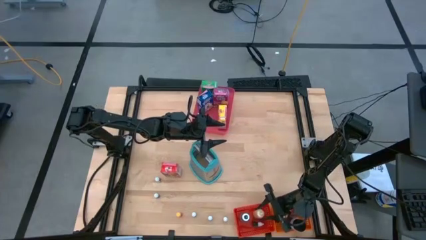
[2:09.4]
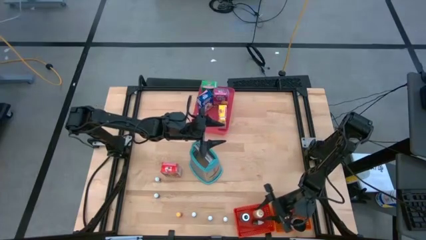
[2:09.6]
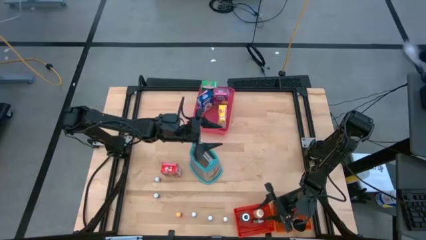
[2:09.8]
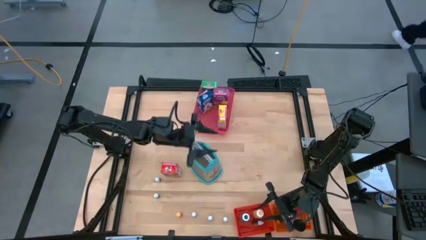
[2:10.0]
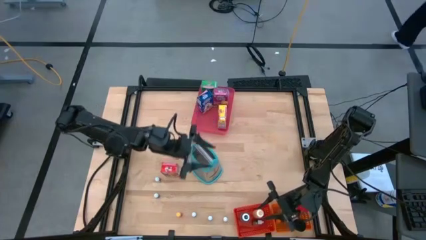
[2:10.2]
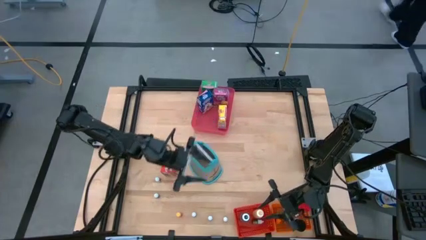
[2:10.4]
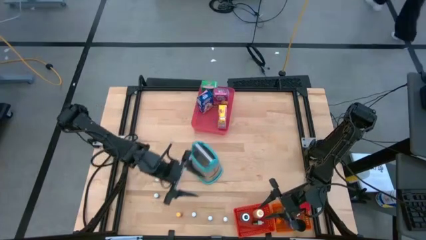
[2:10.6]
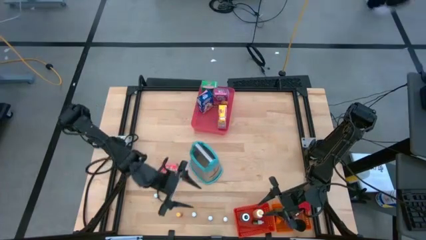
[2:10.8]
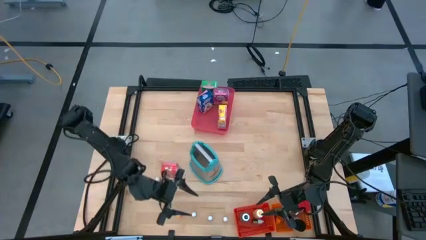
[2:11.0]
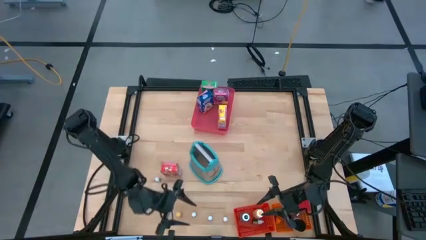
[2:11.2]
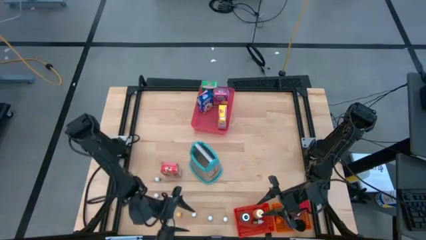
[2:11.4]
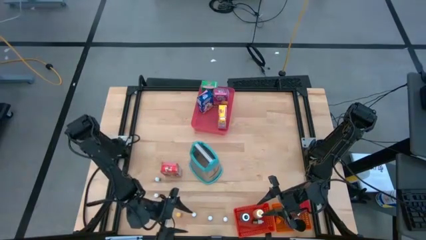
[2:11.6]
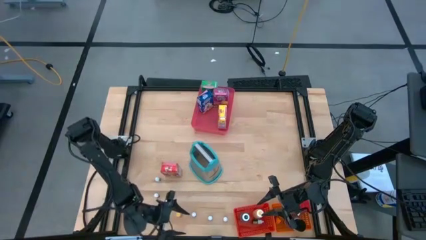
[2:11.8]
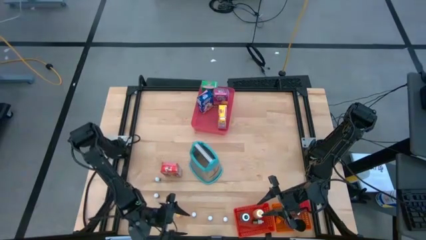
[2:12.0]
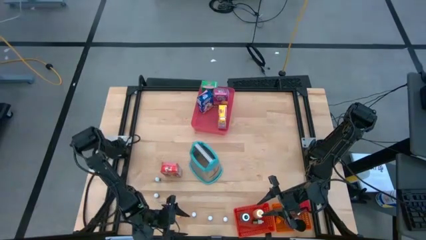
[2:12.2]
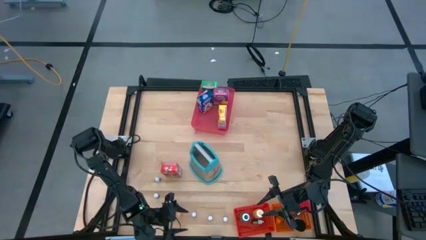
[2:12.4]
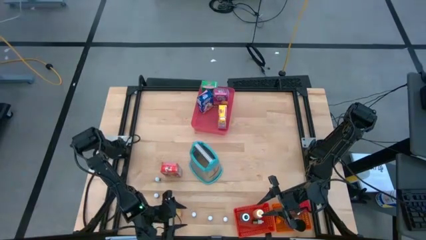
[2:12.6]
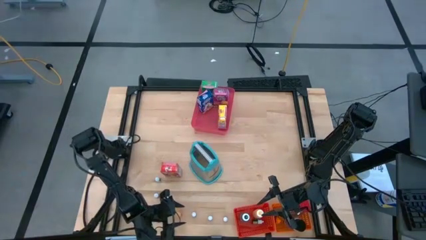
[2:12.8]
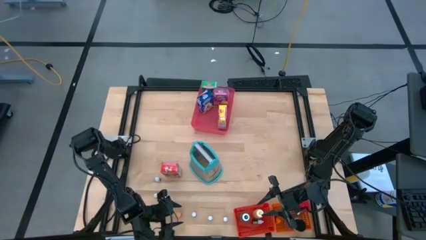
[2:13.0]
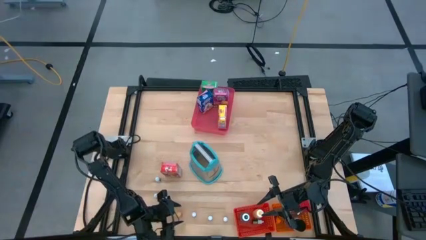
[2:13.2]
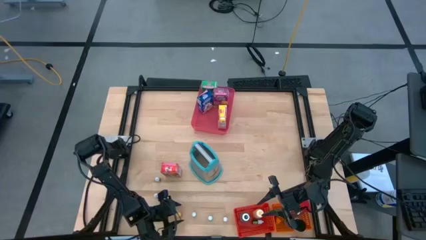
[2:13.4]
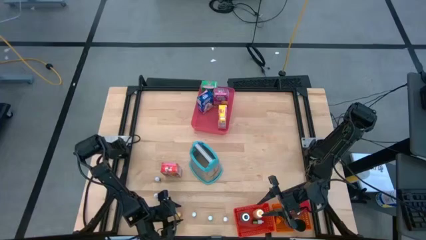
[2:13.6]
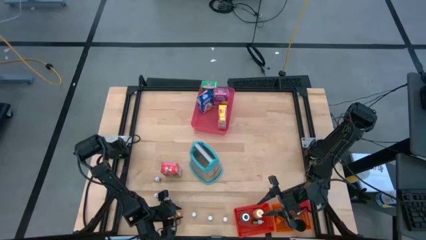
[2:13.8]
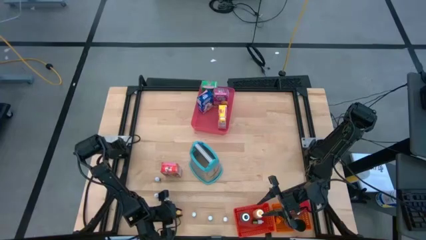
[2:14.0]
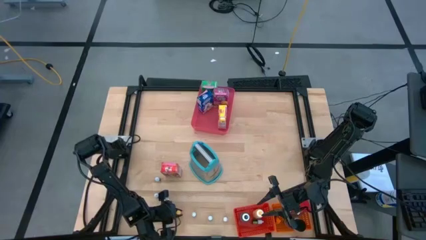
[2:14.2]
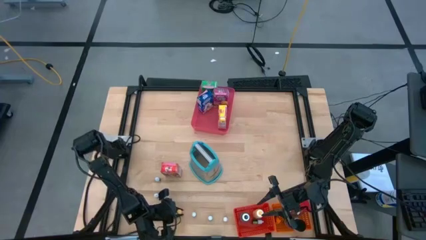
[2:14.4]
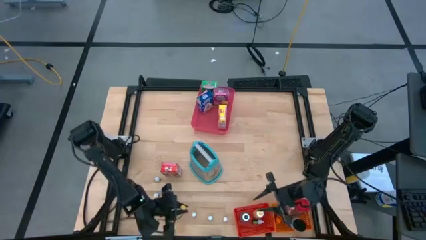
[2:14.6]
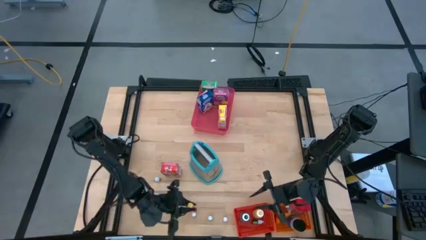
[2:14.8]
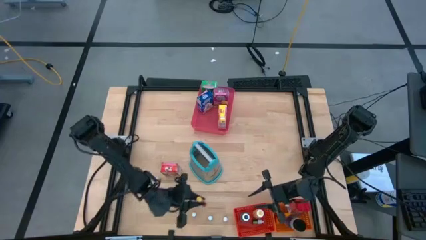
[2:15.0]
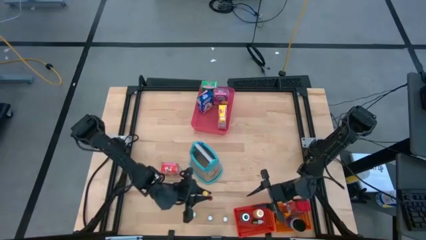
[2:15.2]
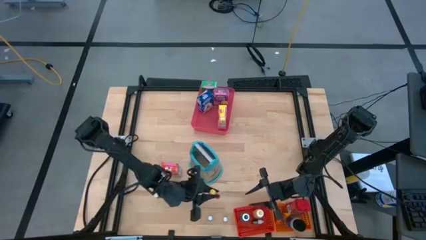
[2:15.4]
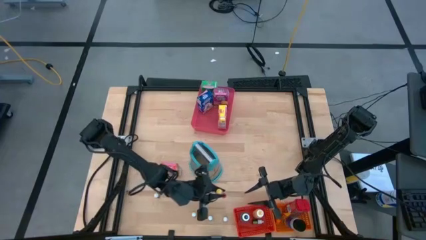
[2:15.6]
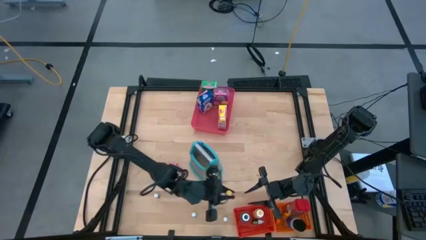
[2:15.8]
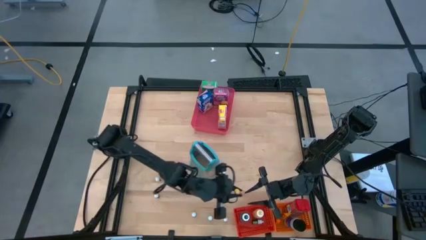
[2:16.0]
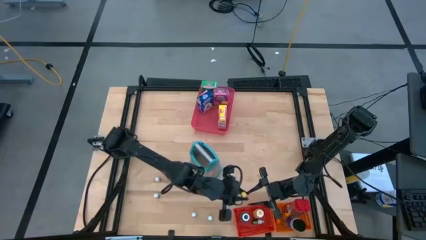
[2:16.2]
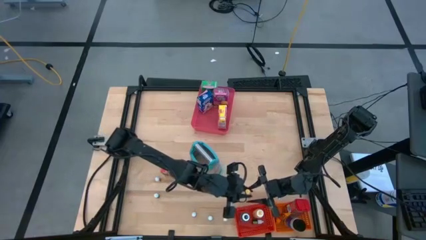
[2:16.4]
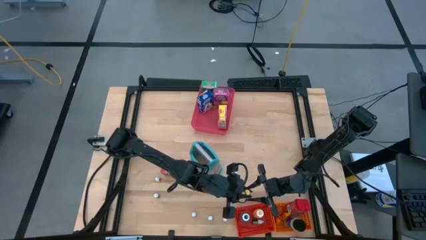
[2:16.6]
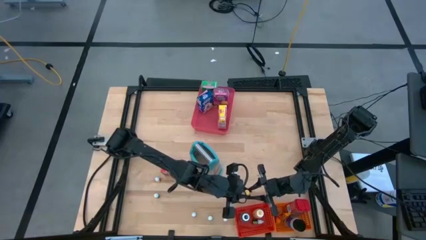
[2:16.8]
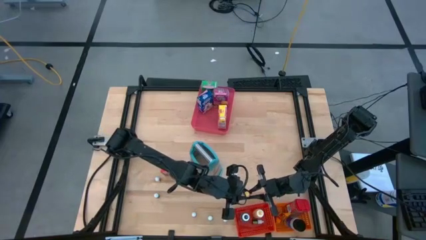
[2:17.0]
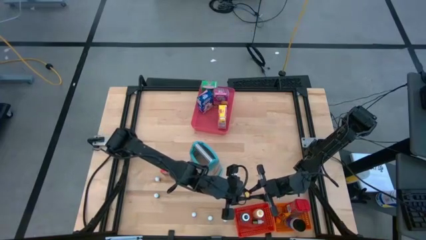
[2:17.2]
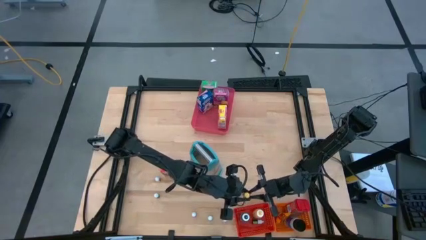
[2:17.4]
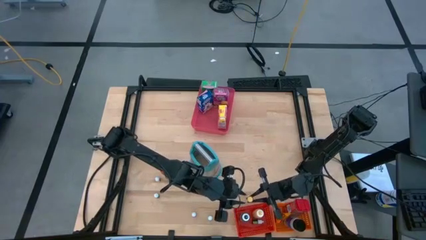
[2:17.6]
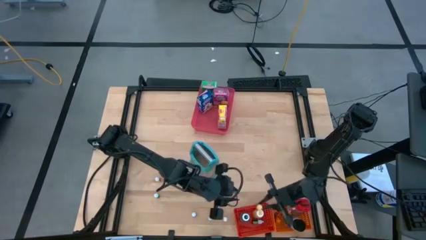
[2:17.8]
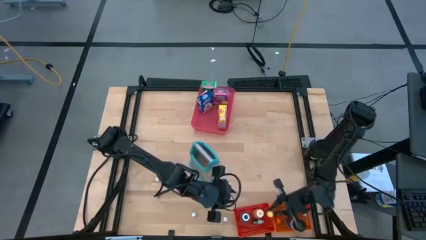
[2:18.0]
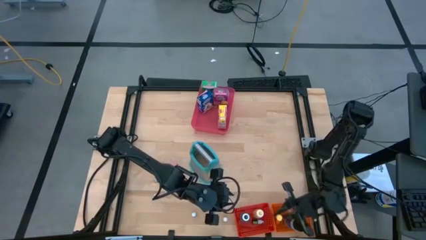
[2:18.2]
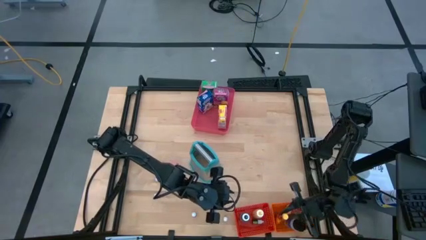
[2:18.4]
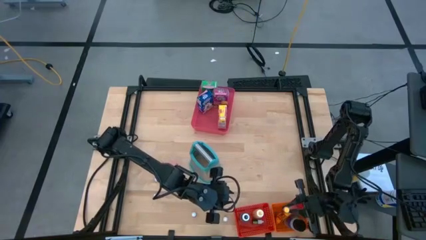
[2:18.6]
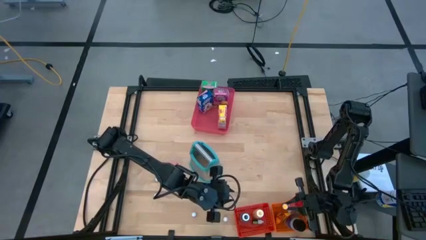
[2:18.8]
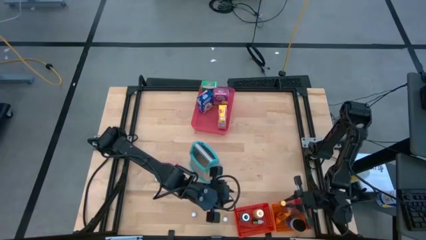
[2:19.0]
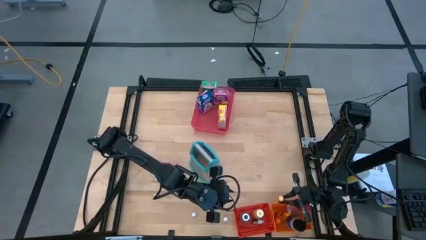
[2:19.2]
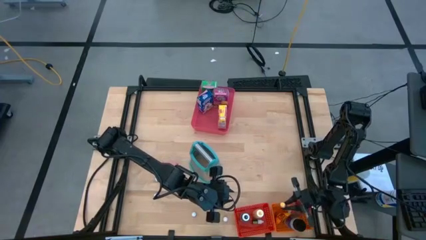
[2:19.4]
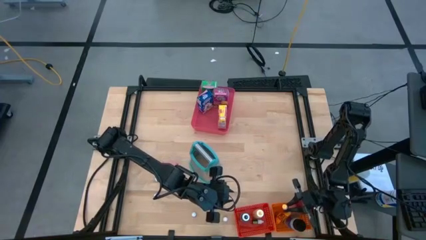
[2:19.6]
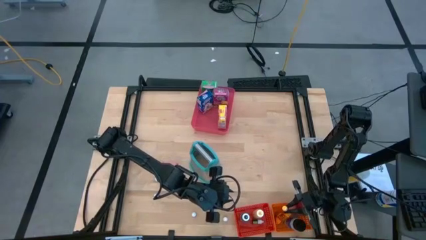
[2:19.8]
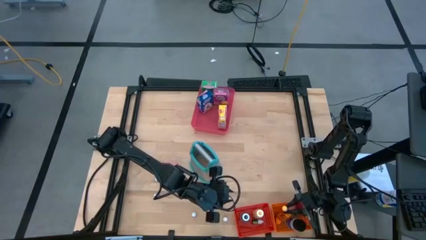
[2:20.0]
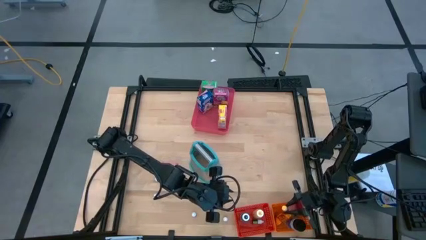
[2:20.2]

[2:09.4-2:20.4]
Task: Pick & Place Kitchen Items
Put the orange seasoning bottle into the orange bin

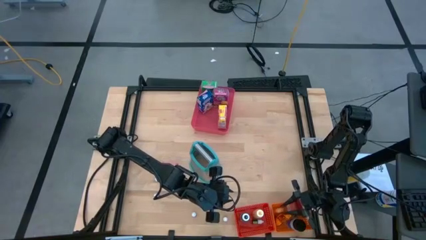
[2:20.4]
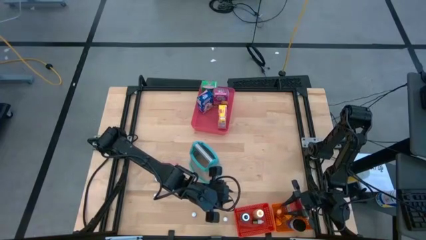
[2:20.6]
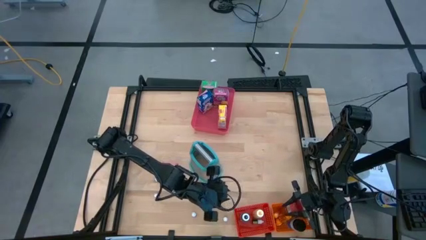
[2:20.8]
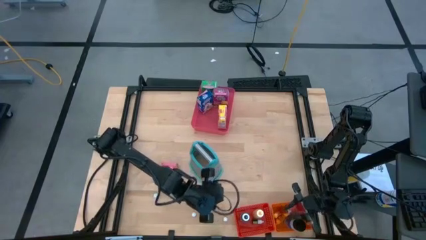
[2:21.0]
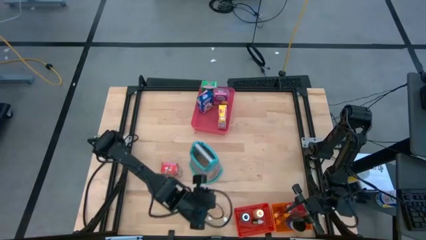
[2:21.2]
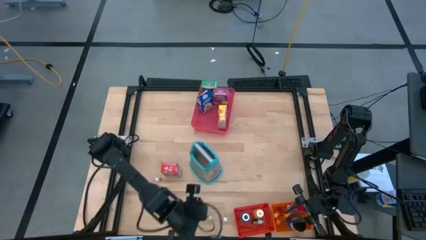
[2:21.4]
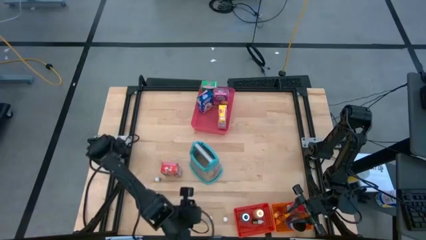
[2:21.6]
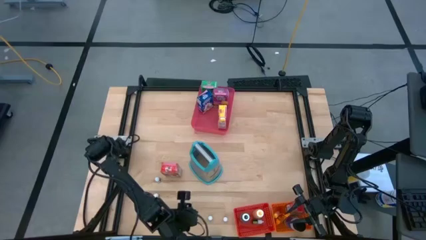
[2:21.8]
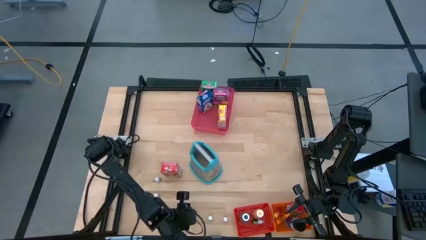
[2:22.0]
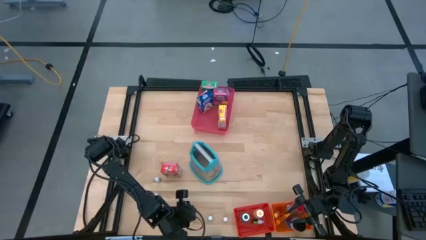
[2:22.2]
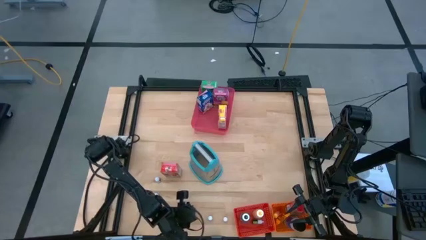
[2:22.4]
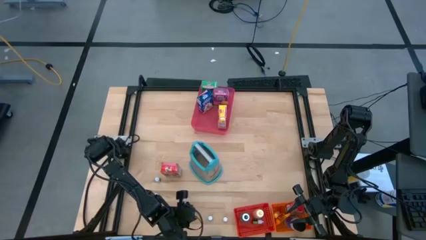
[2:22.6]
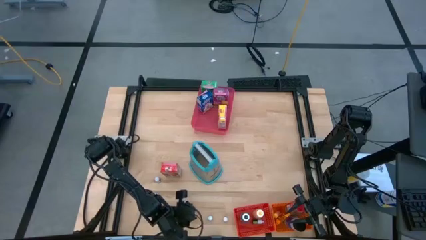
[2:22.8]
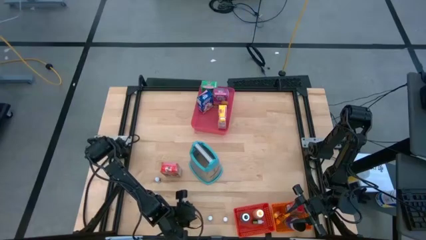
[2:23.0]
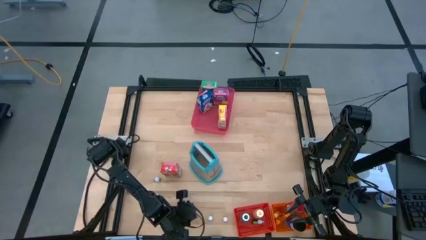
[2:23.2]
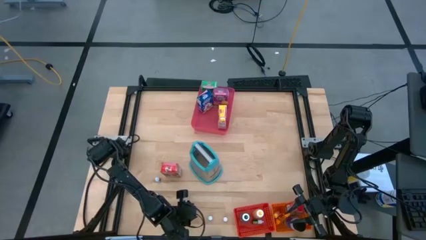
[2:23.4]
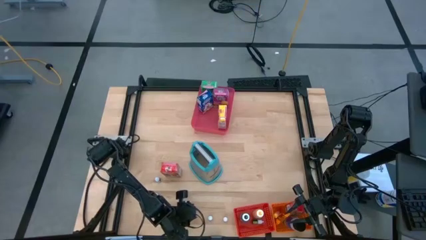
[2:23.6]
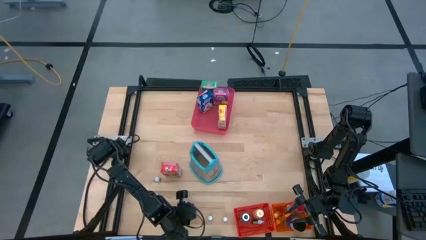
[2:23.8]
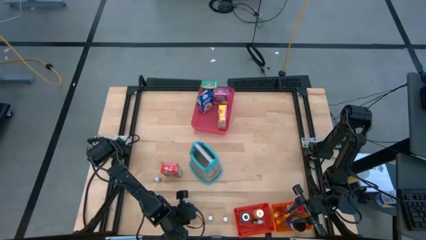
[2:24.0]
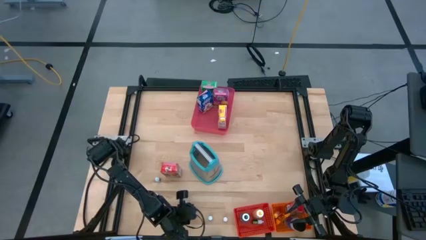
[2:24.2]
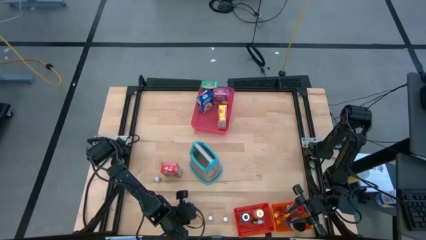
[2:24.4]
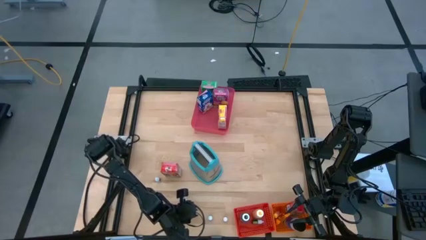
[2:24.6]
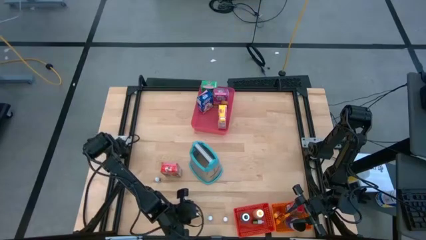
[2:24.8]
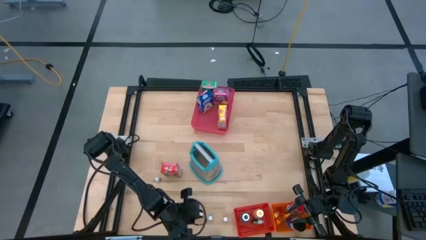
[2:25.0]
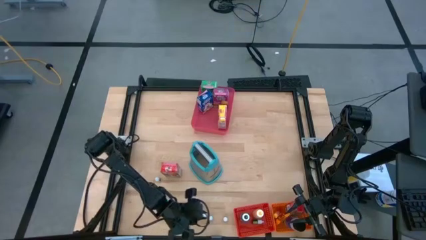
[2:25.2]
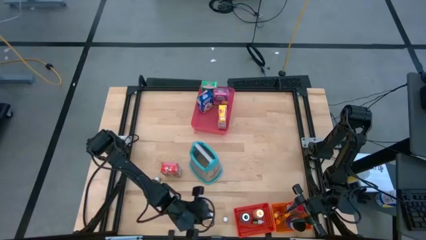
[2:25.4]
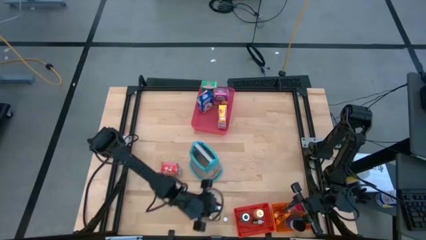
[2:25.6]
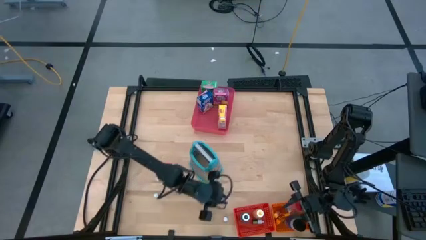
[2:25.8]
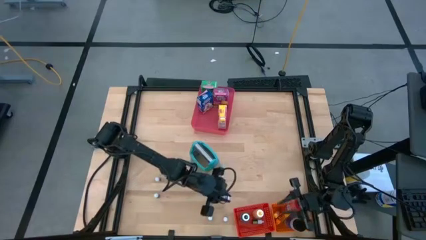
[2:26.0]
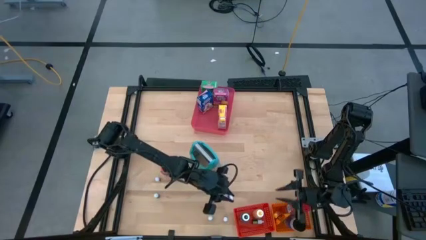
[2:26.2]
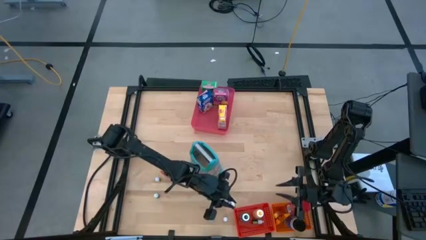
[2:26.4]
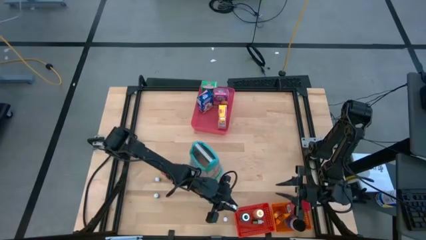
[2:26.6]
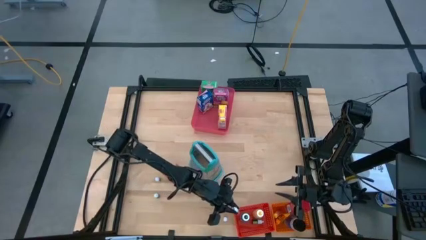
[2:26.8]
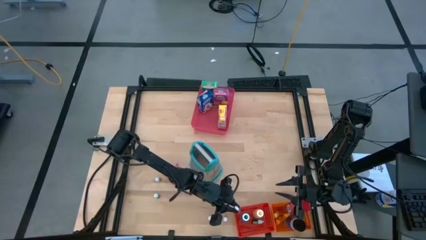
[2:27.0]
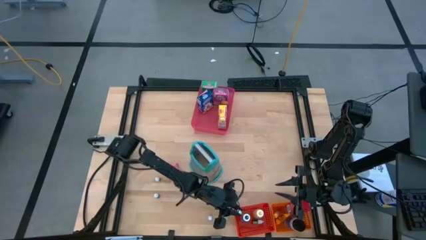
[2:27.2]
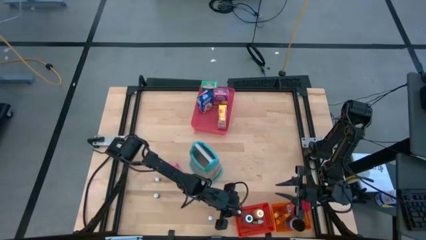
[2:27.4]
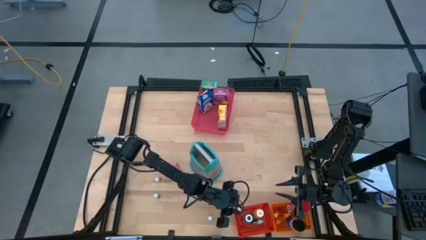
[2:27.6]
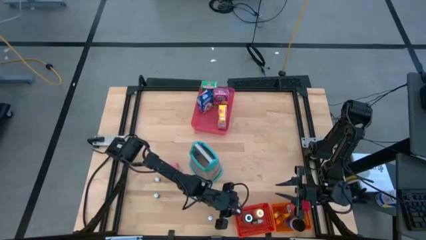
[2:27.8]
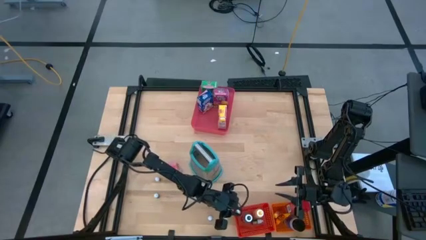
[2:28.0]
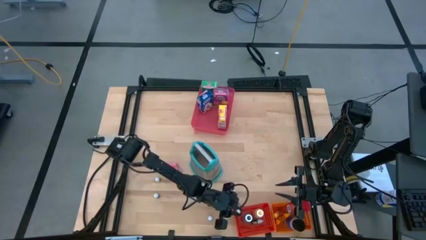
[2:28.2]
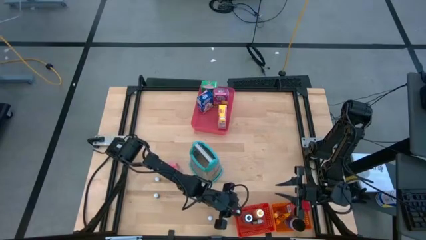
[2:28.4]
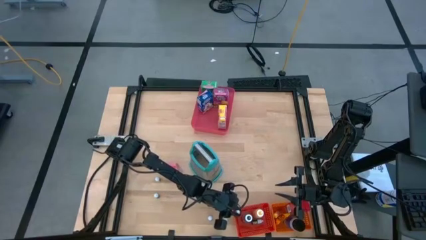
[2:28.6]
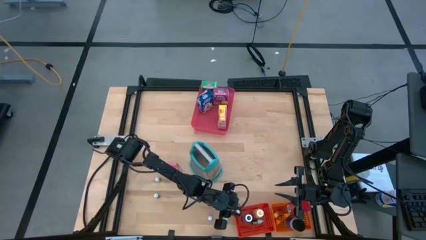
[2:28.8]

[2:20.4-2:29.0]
Put the red food coloring bottle into the pink bin
